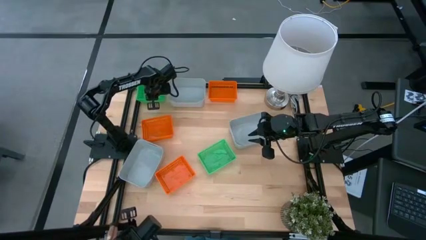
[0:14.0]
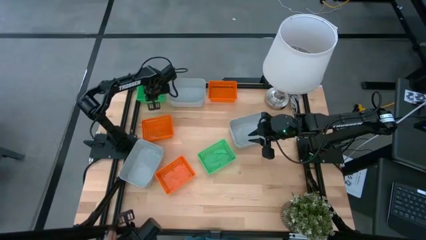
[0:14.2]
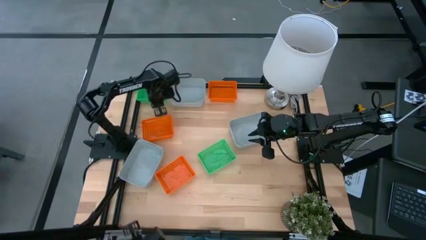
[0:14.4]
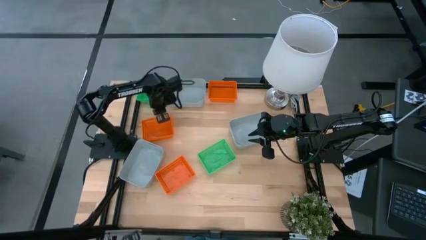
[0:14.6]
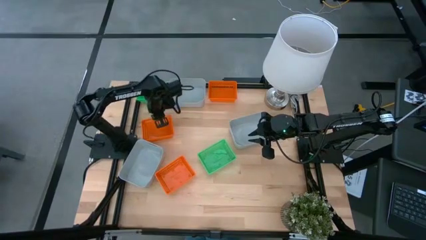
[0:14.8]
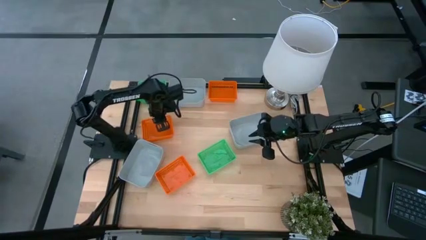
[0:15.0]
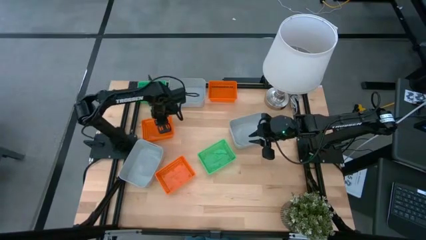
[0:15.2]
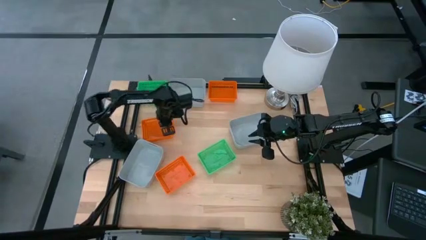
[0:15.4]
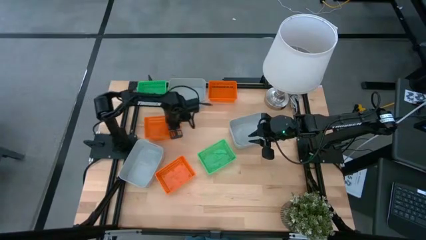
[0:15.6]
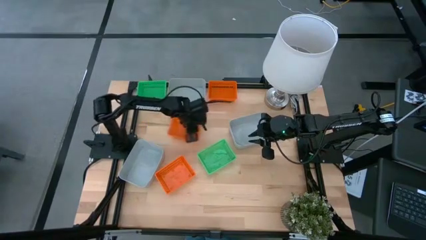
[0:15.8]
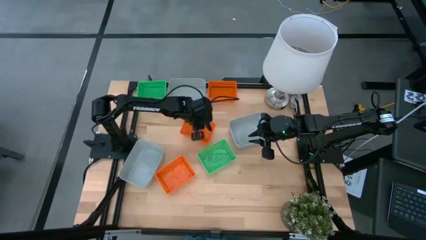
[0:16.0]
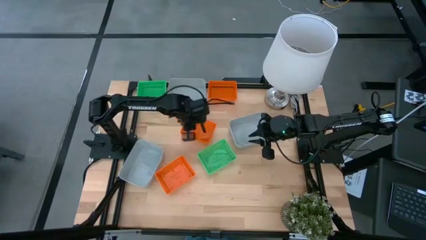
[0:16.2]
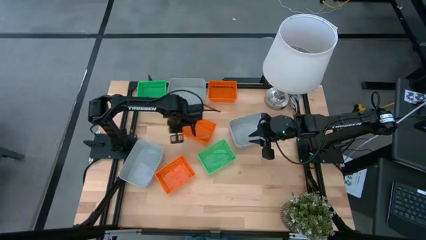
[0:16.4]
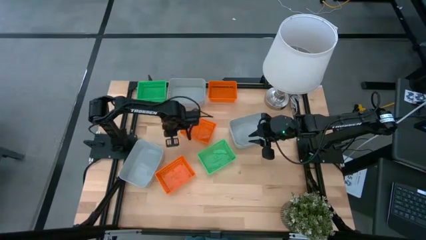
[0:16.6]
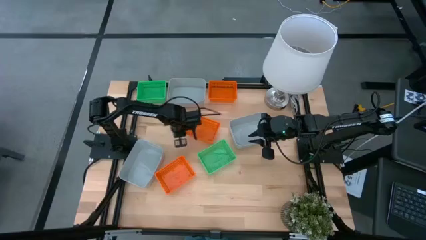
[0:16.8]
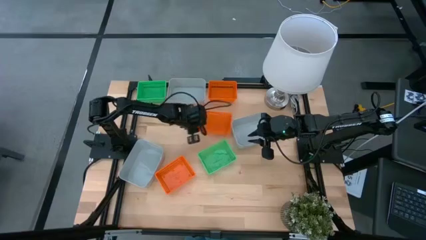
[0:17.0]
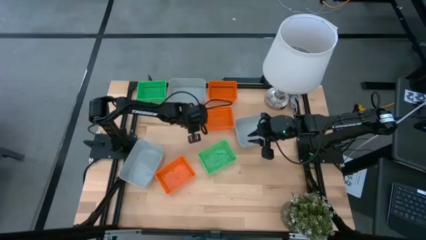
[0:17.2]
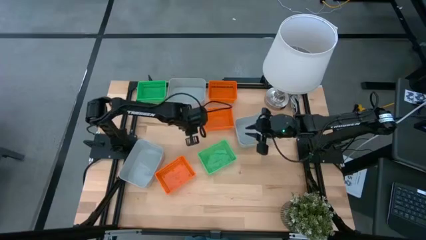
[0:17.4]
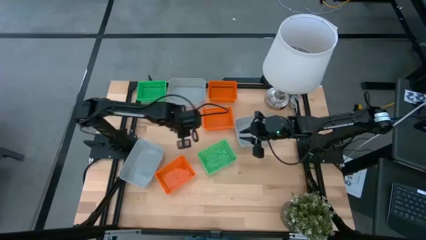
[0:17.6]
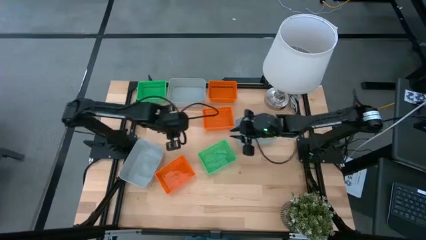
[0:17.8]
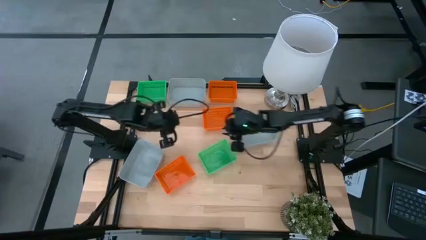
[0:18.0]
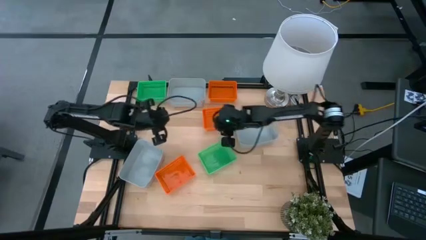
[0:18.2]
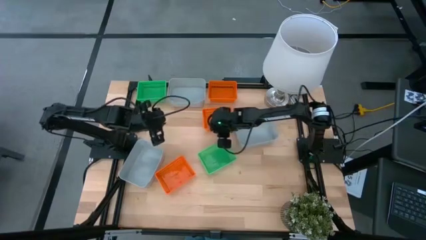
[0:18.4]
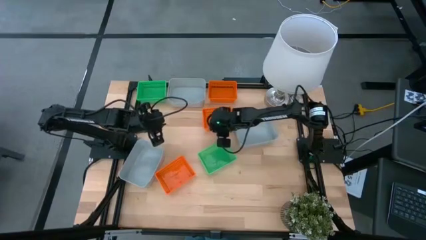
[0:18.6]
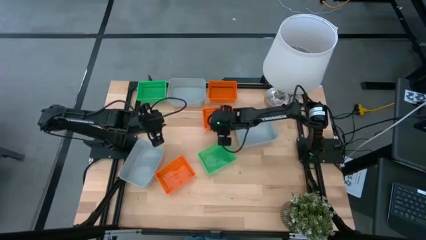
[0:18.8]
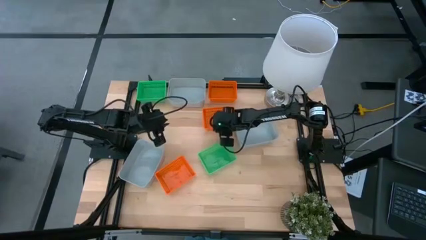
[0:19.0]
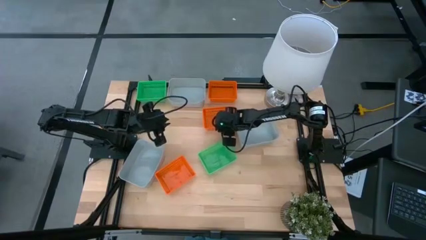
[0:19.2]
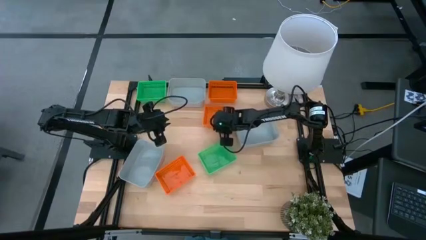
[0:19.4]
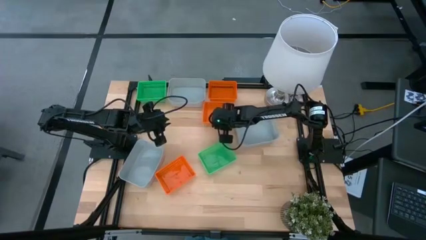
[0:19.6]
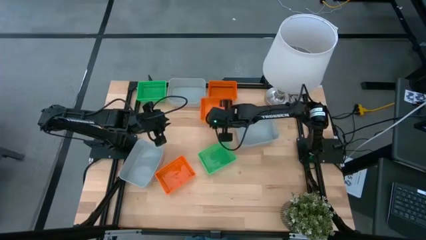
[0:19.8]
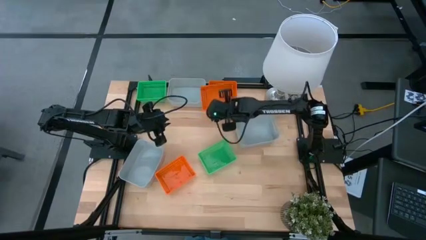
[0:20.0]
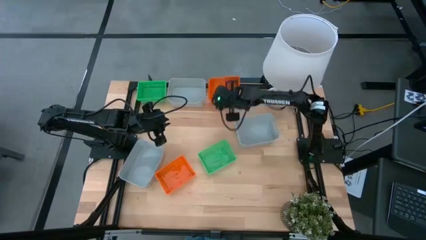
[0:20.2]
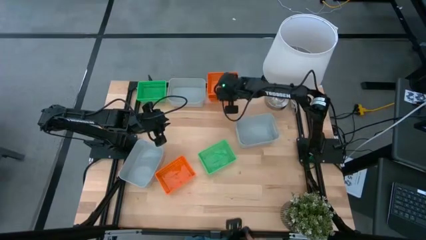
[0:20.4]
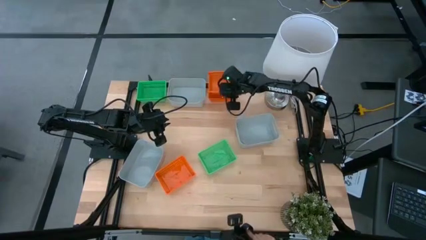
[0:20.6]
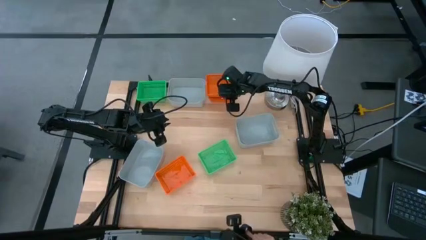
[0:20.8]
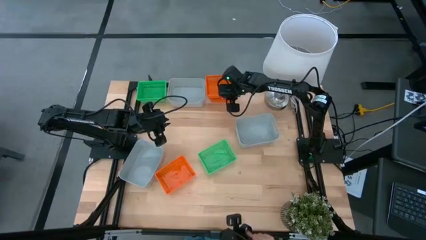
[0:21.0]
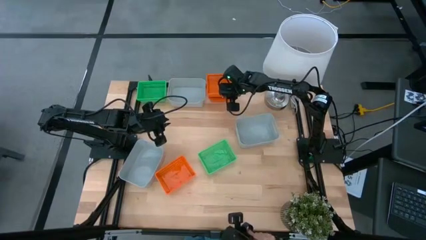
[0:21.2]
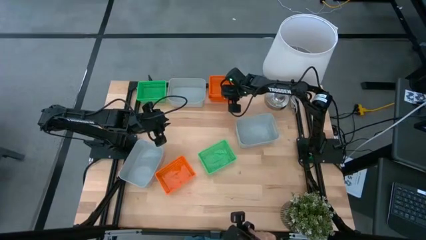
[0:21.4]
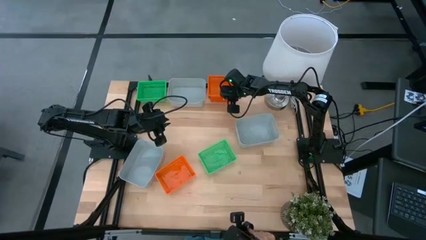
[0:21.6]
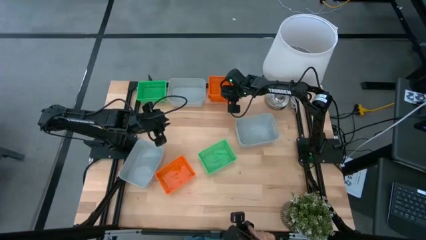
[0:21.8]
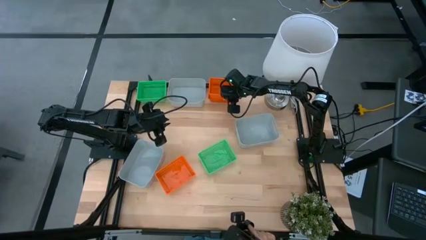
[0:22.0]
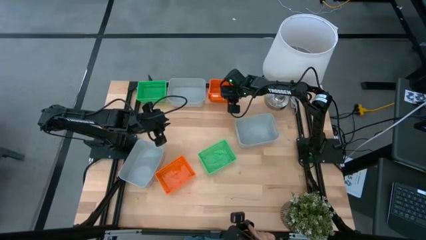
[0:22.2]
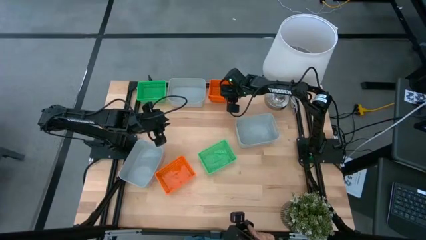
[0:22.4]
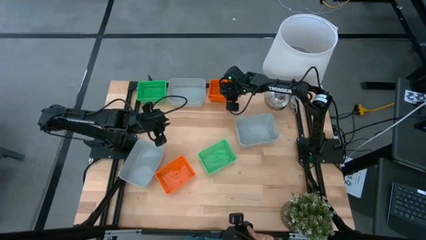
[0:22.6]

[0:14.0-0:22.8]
Stack the middle orange bin on top of the top orange bin

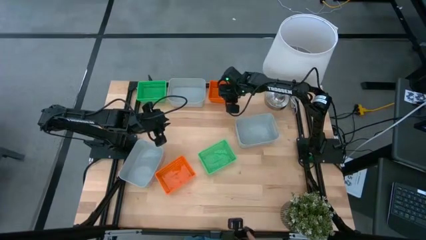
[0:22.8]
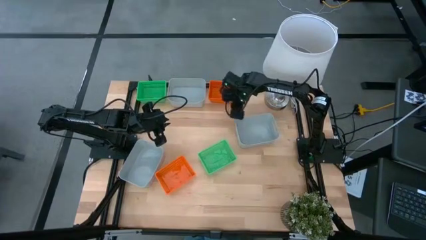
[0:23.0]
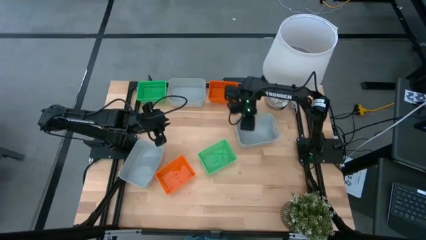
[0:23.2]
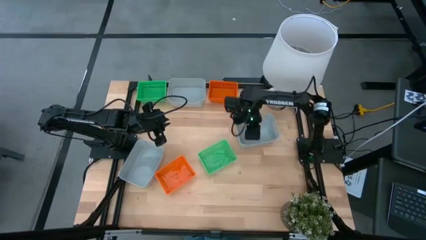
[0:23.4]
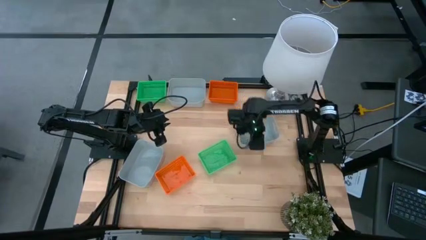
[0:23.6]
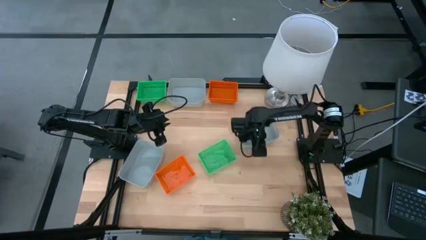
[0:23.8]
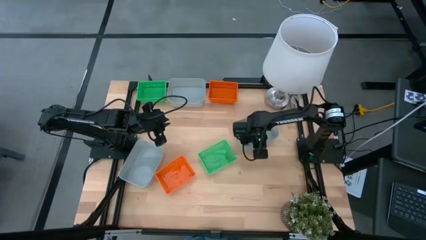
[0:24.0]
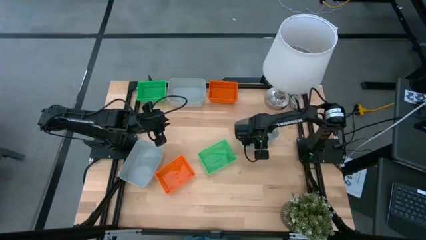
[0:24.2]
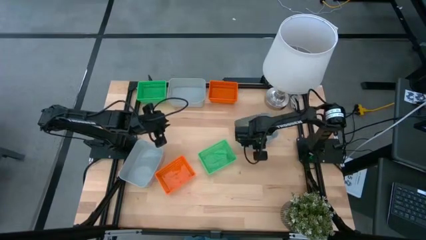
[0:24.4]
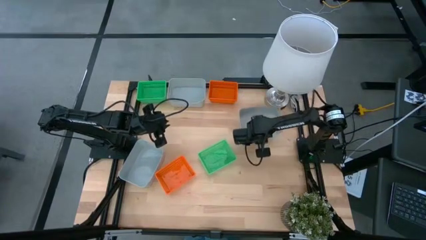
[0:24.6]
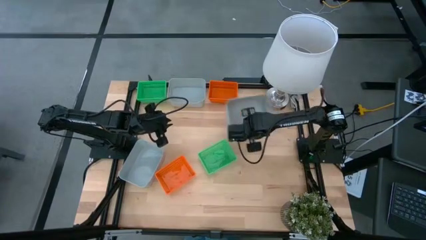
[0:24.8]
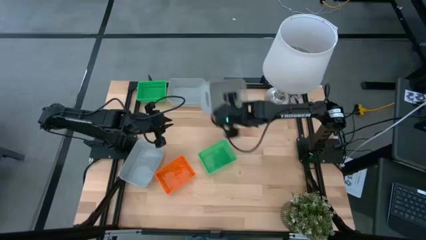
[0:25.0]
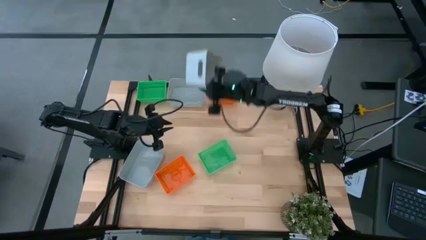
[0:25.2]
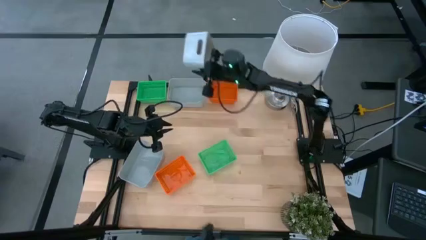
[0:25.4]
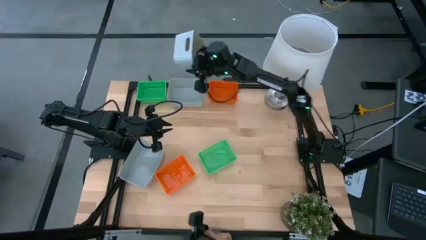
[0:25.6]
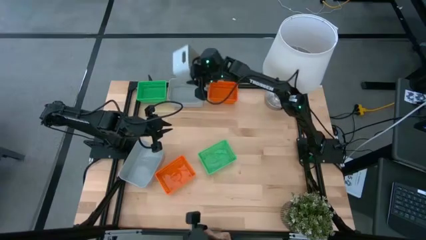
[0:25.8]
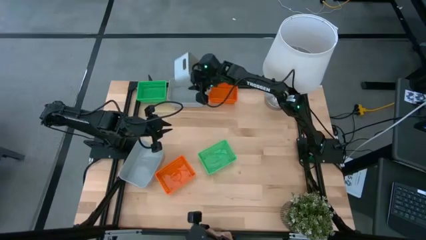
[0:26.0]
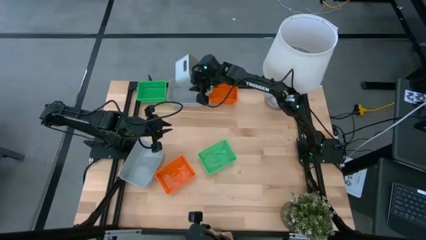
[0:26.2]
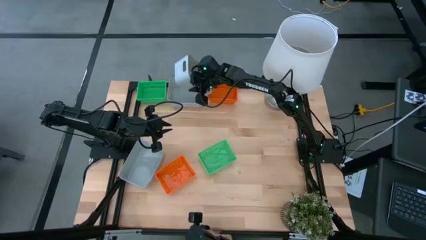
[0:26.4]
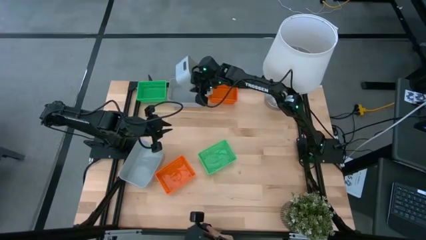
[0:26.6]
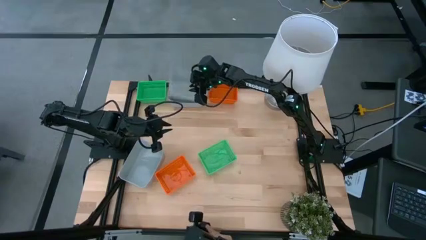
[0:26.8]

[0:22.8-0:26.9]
Stack the middle right gray bin on top of the top gray bin
